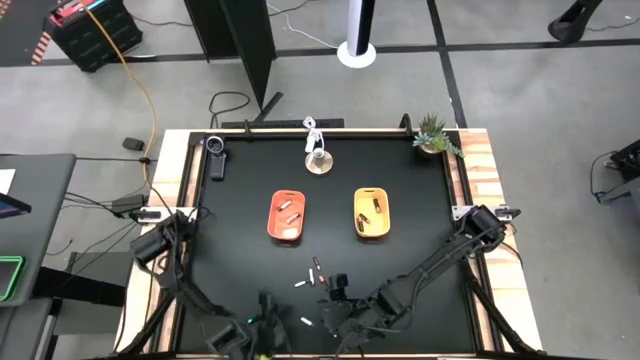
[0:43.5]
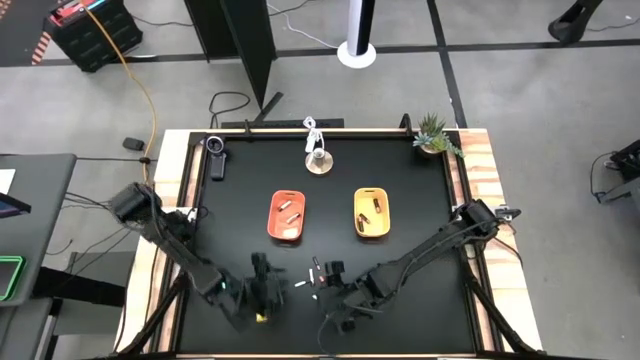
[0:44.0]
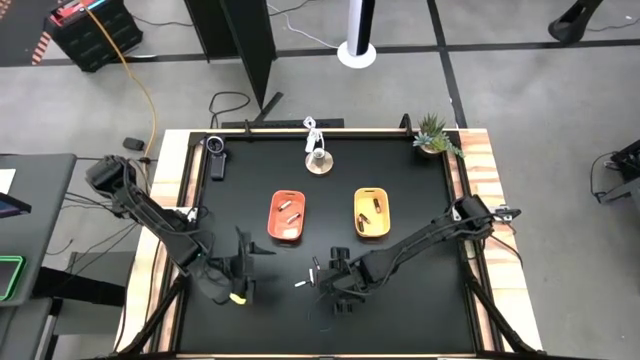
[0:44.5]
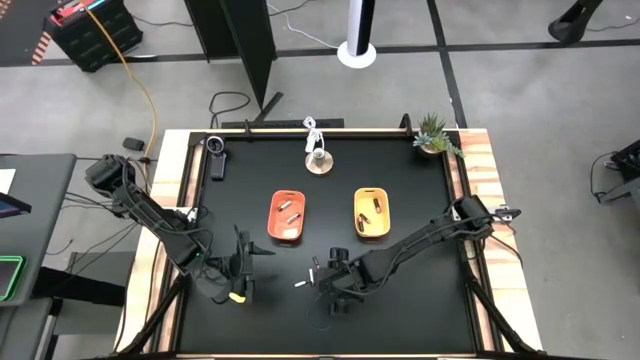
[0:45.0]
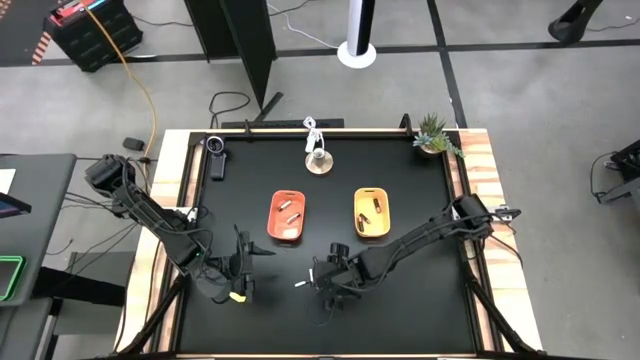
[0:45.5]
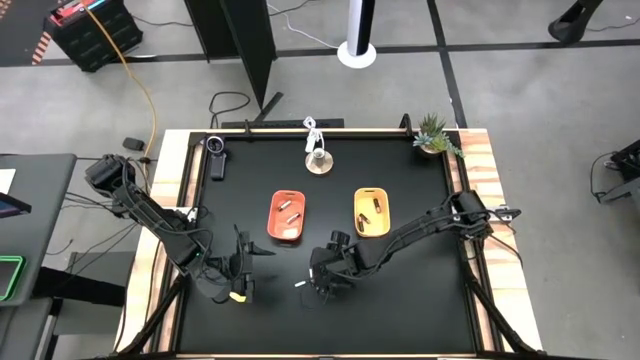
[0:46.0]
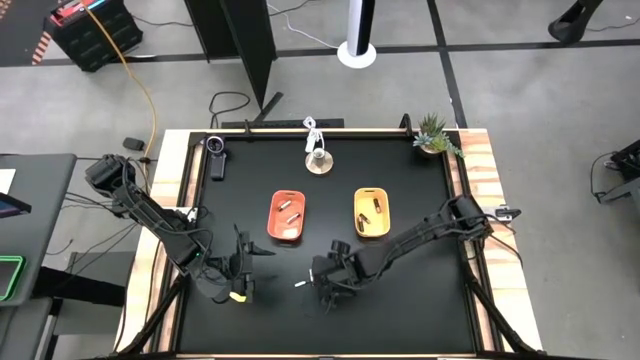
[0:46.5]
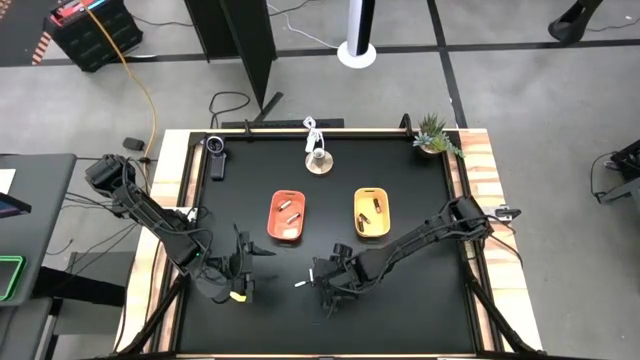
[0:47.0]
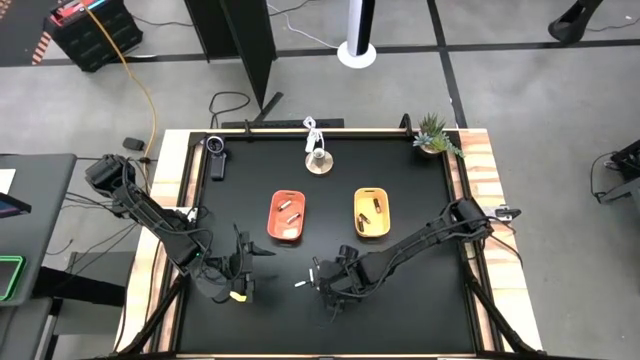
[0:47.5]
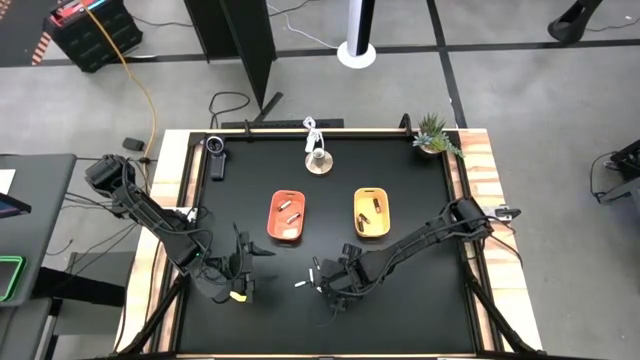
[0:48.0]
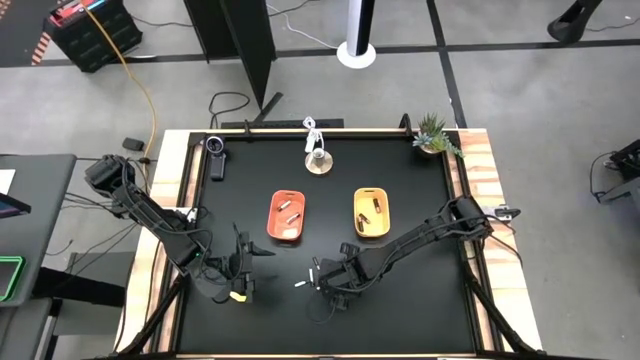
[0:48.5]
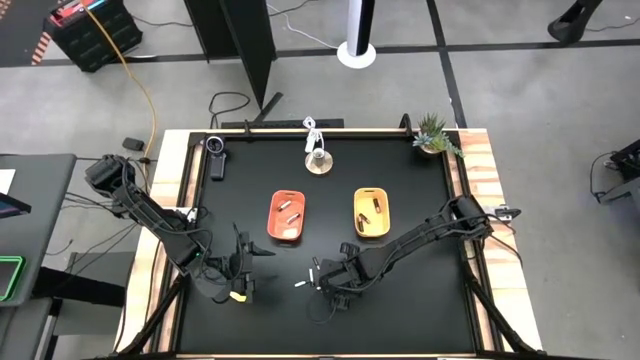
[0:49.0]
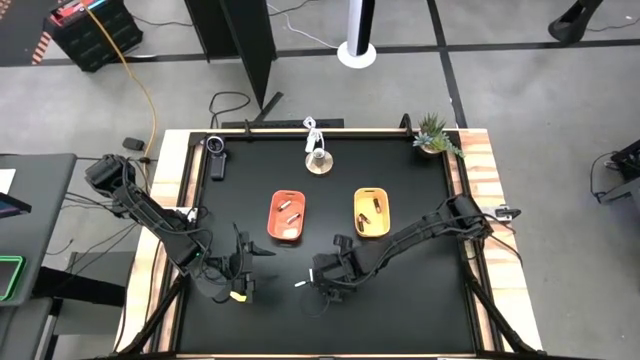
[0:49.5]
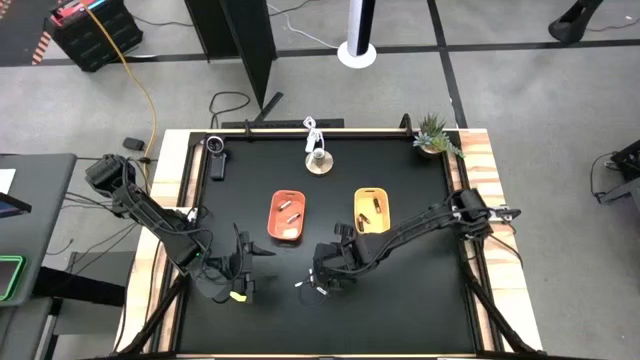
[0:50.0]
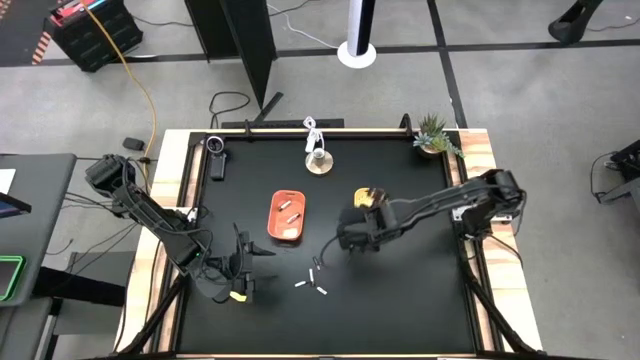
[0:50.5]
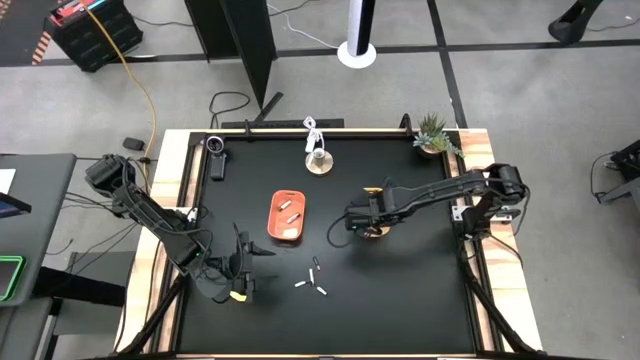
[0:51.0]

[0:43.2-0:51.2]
Task: Sort batteries
Put the black battery into the yellow bin

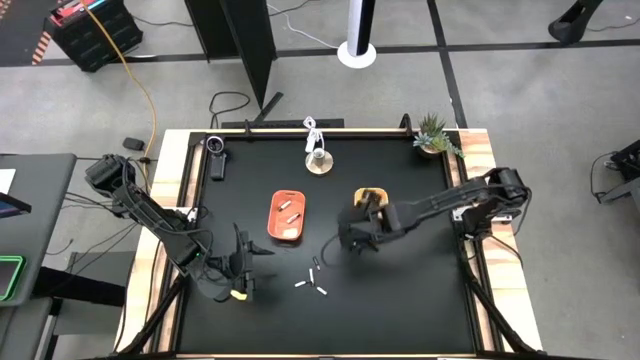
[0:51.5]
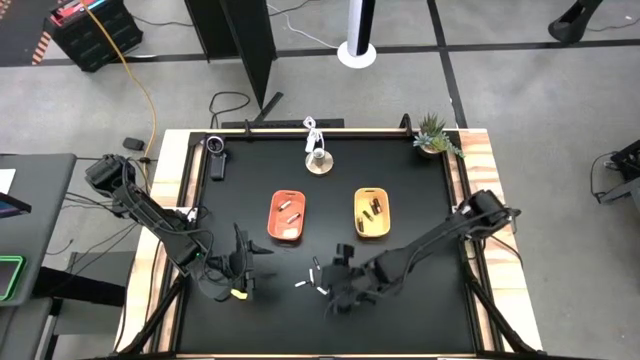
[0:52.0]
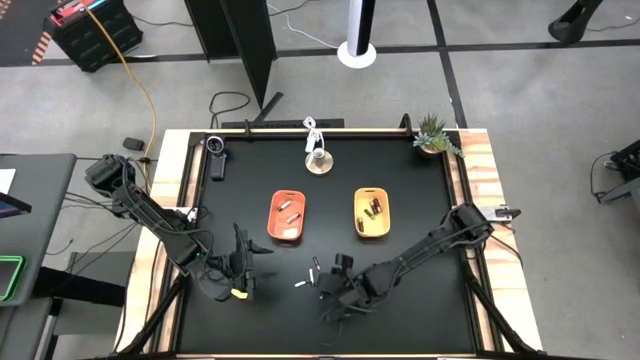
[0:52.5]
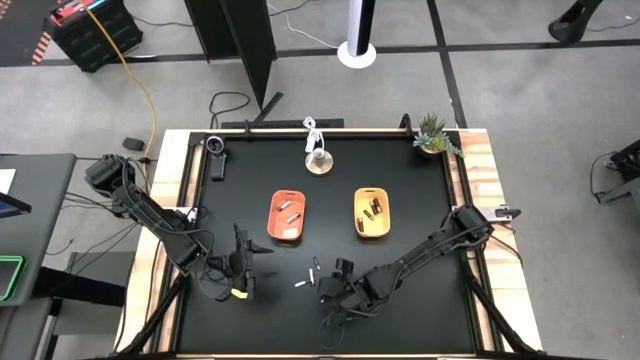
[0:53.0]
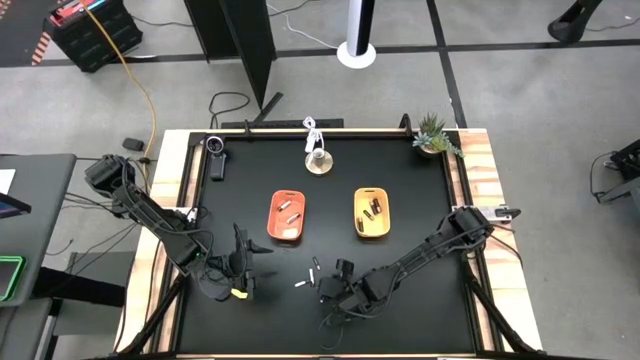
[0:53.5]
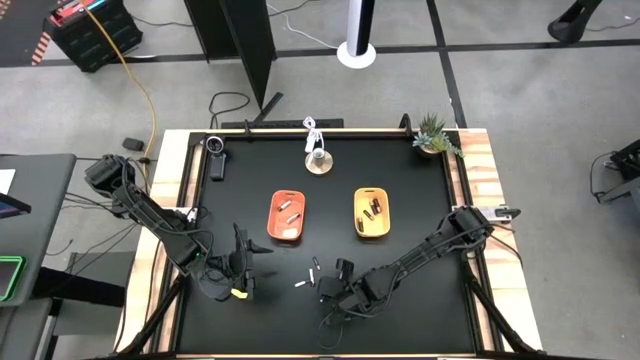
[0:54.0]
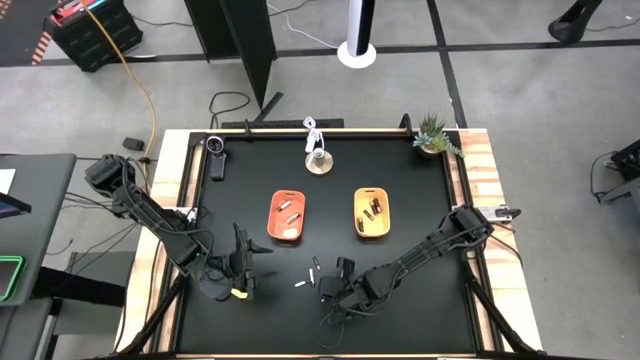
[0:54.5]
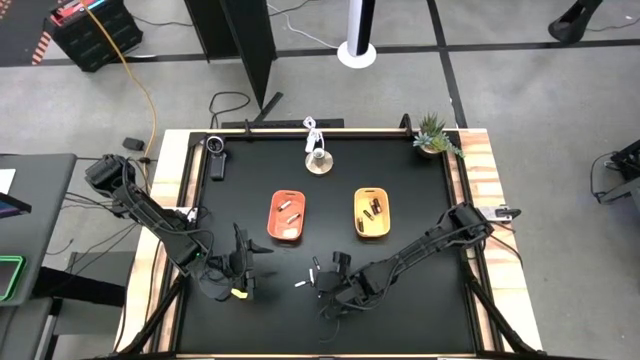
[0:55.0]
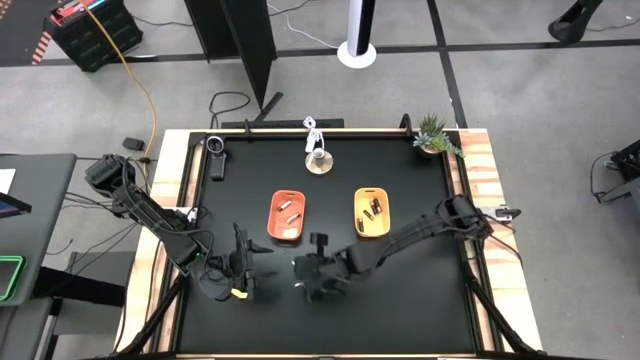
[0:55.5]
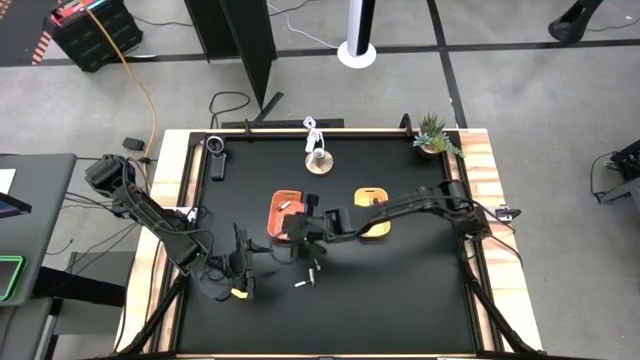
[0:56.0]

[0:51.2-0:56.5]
Put the silver battery into the orange bin

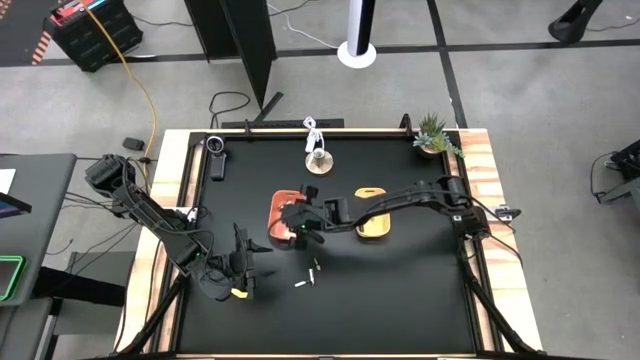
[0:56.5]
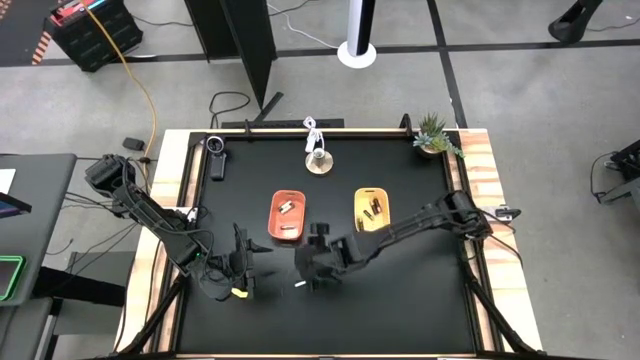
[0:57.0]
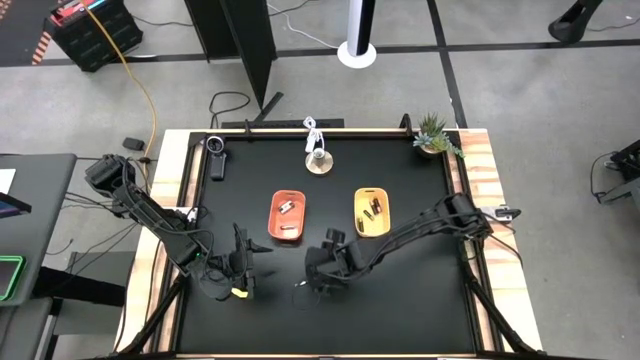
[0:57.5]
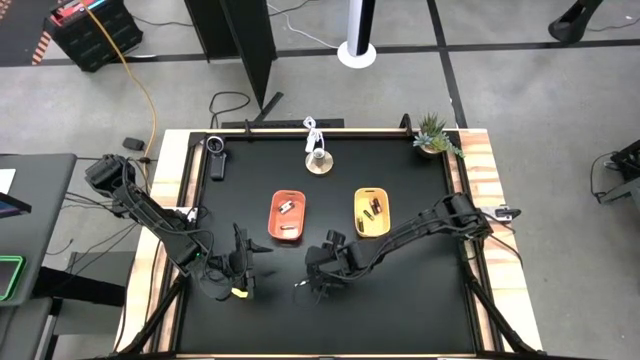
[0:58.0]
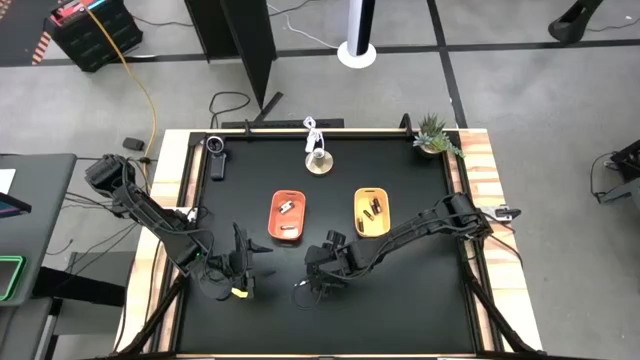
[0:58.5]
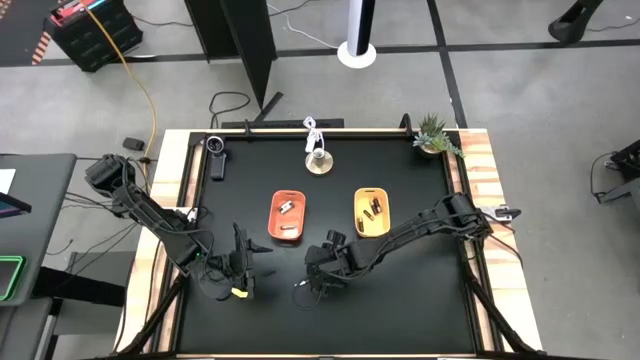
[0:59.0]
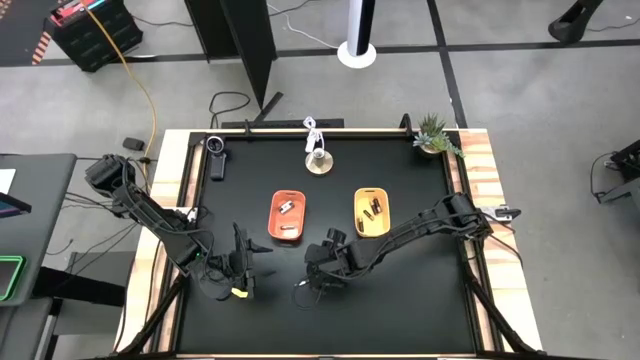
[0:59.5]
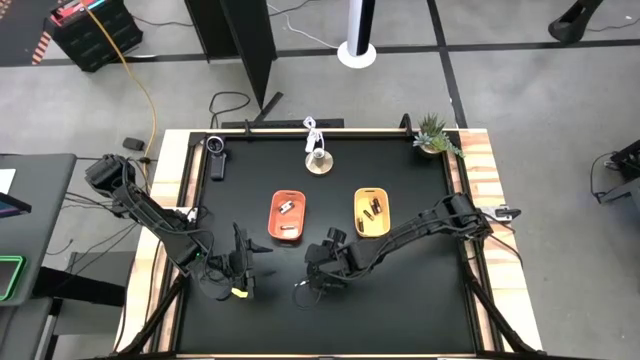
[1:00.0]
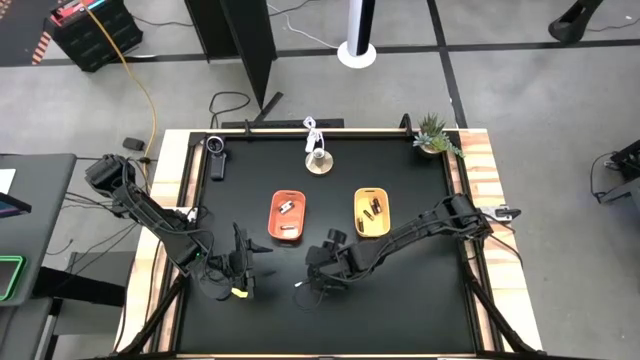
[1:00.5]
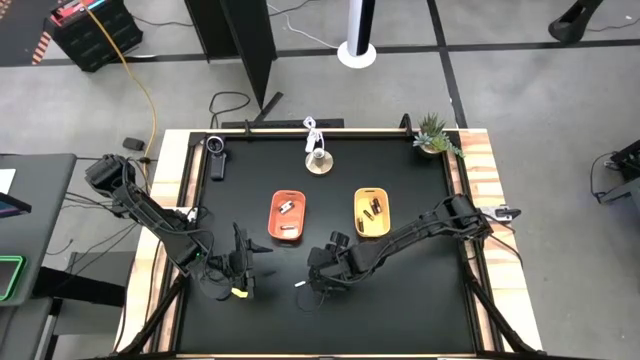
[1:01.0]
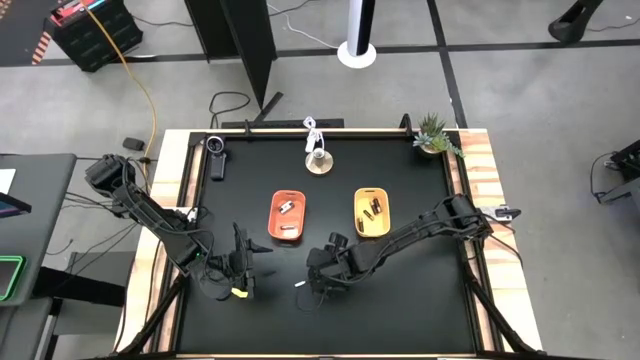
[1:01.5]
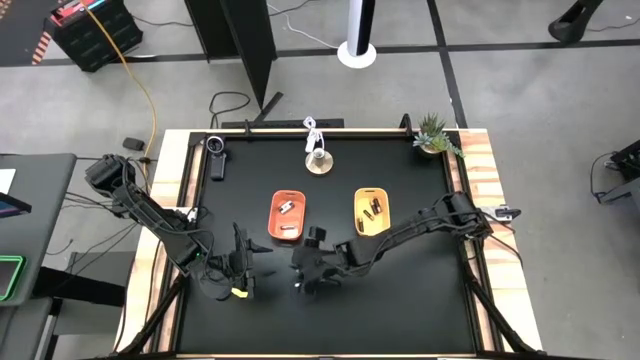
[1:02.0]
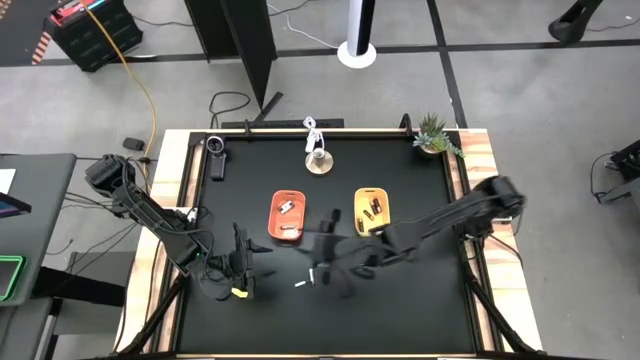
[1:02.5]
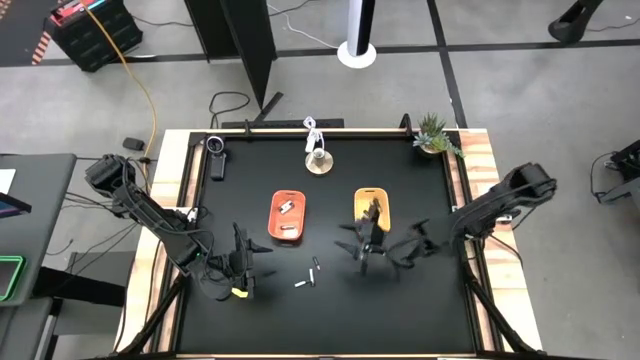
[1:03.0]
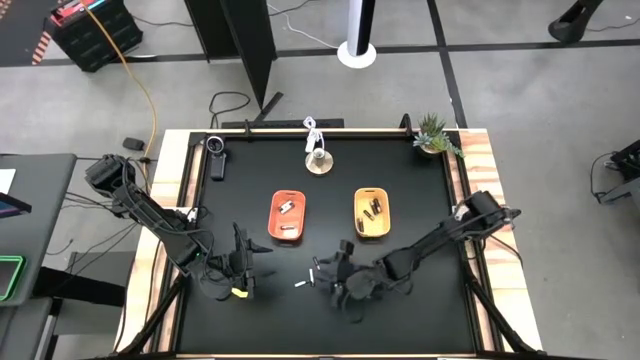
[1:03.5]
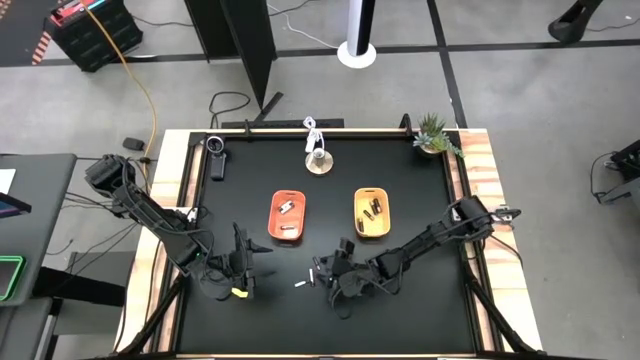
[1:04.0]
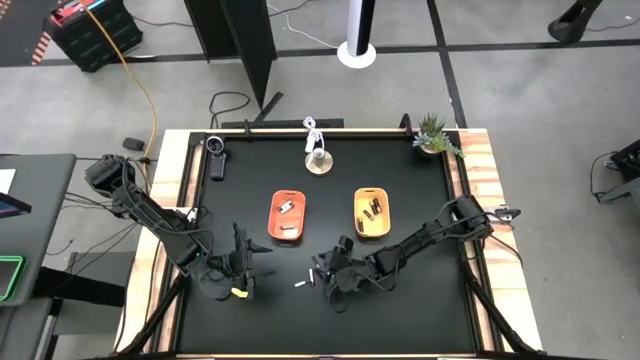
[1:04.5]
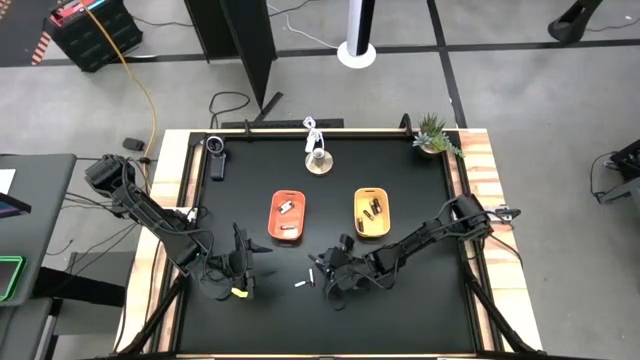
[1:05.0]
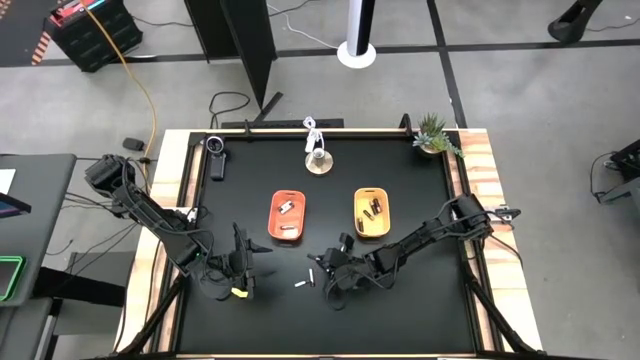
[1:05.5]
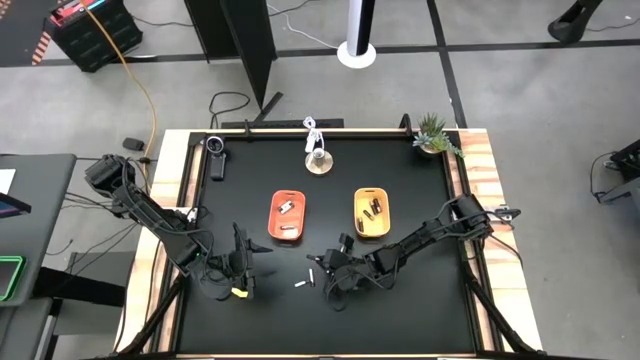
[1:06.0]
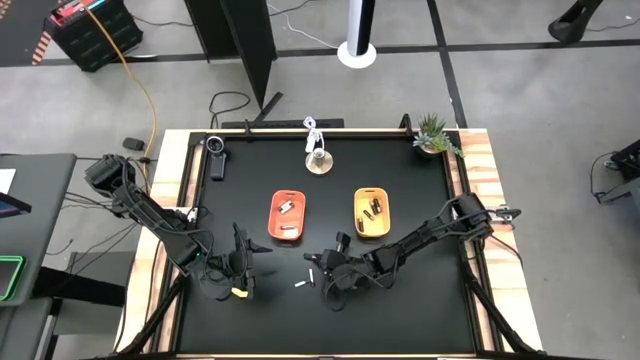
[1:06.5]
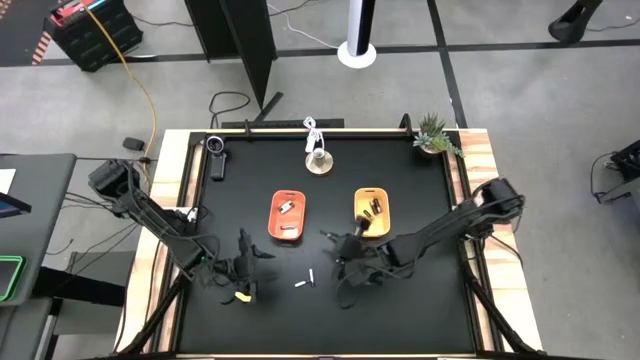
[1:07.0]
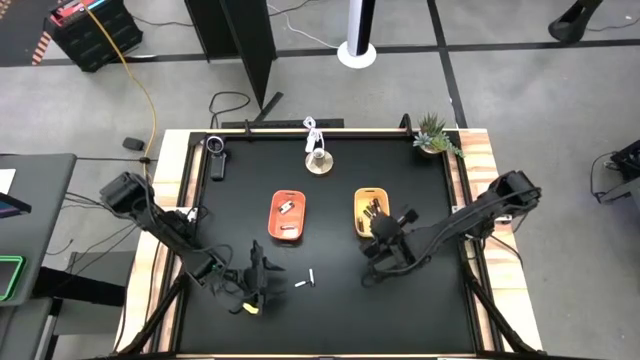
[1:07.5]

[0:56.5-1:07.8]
Put the black battery into the yellow bin
